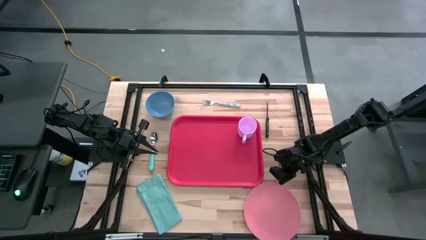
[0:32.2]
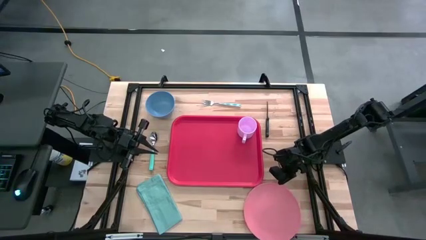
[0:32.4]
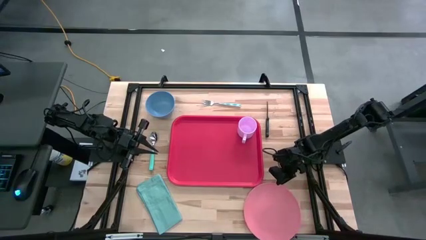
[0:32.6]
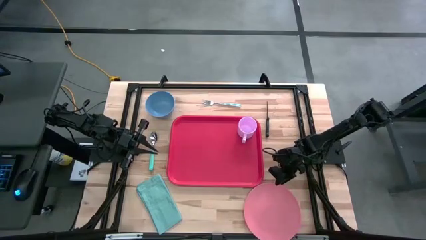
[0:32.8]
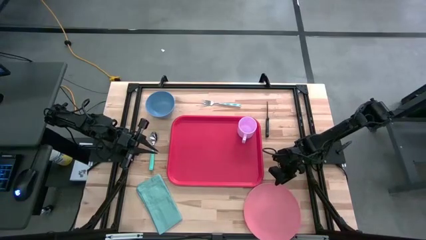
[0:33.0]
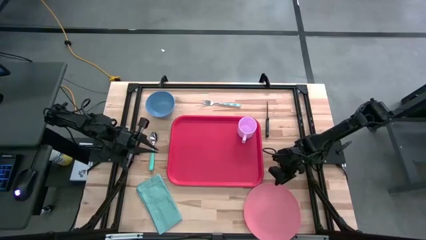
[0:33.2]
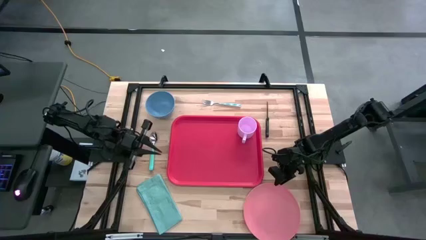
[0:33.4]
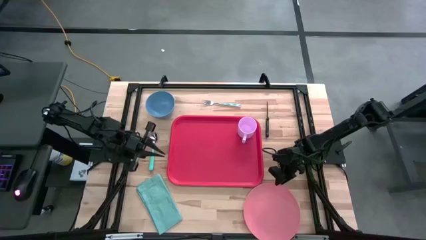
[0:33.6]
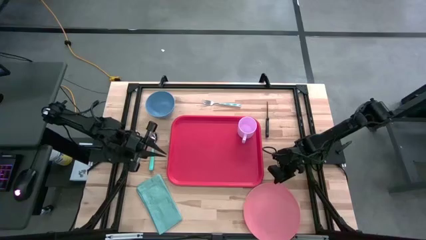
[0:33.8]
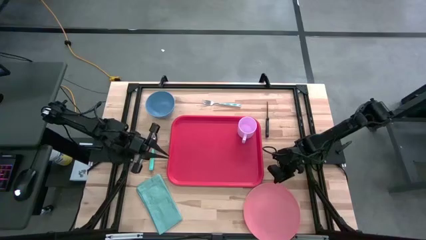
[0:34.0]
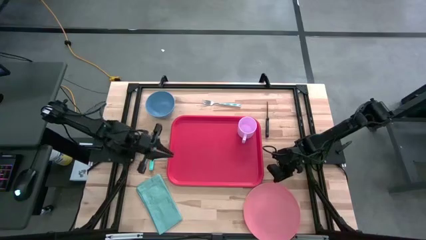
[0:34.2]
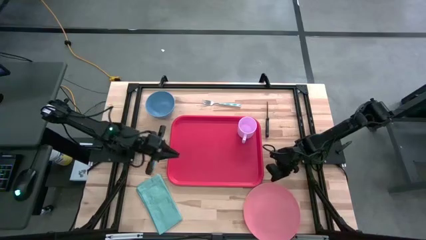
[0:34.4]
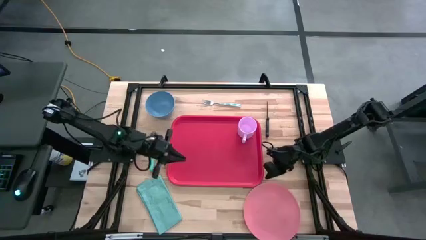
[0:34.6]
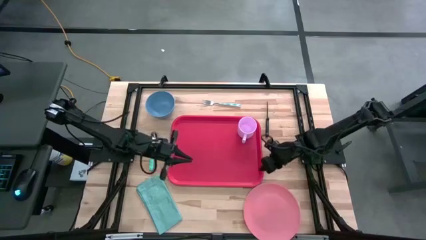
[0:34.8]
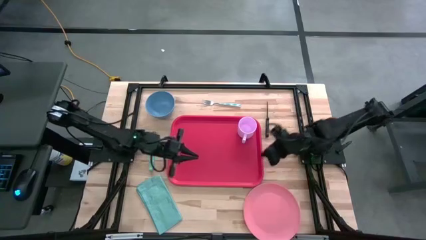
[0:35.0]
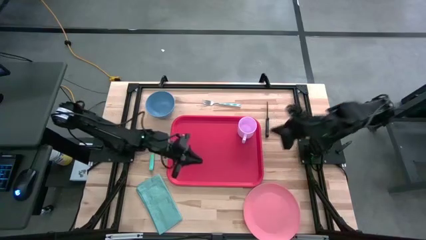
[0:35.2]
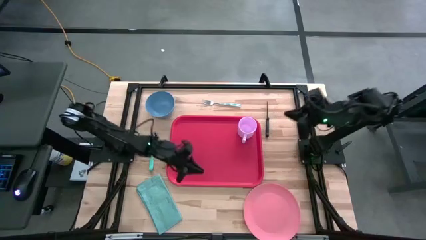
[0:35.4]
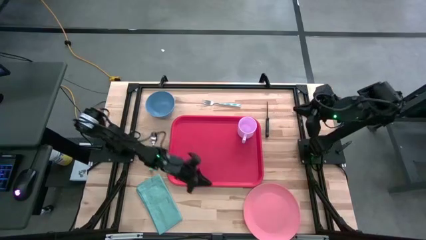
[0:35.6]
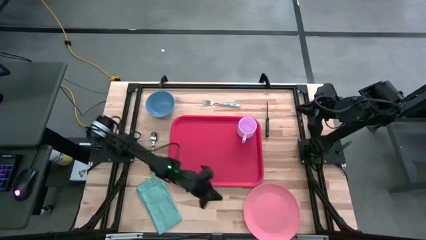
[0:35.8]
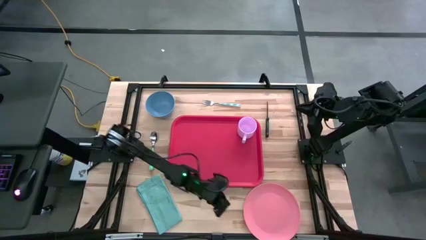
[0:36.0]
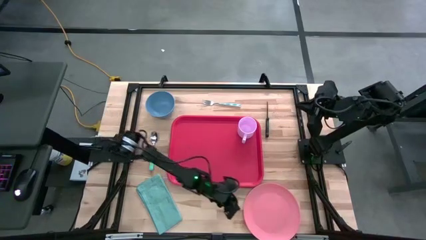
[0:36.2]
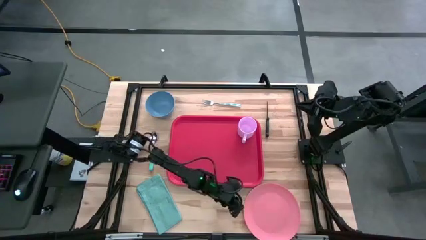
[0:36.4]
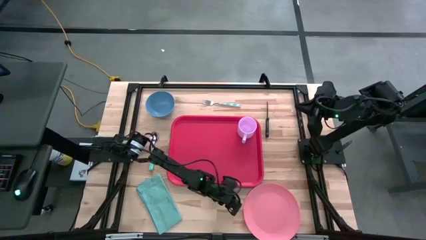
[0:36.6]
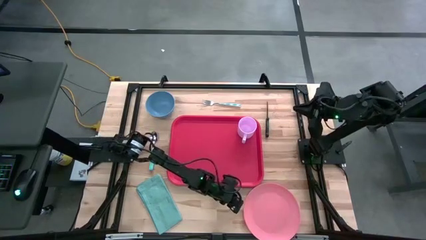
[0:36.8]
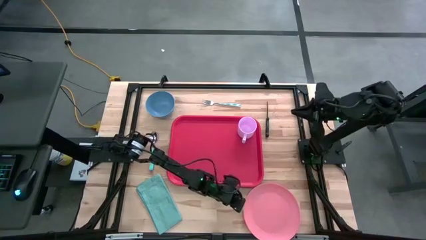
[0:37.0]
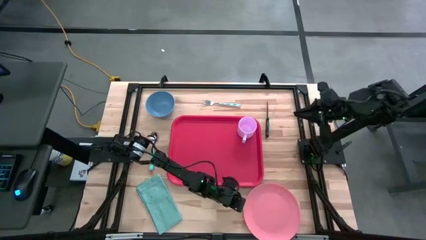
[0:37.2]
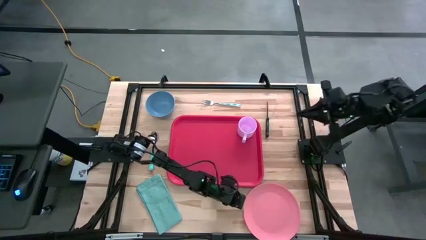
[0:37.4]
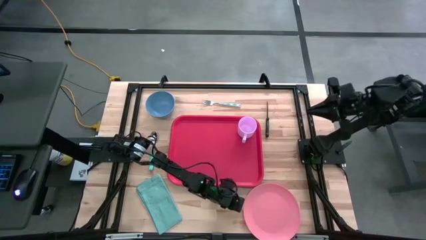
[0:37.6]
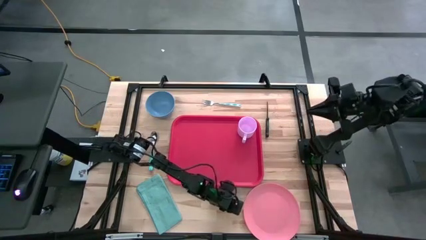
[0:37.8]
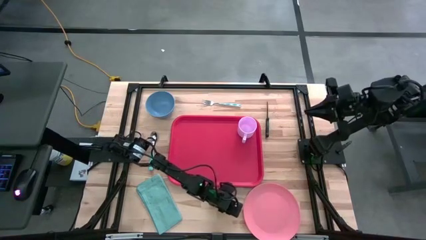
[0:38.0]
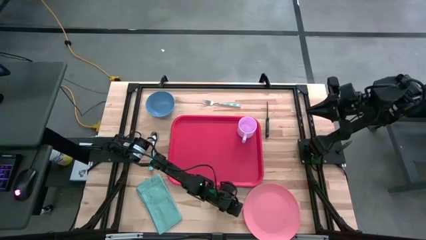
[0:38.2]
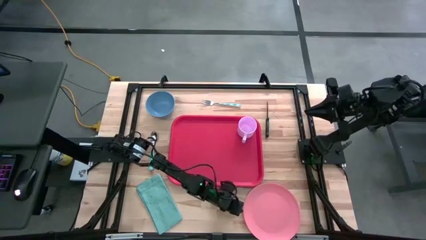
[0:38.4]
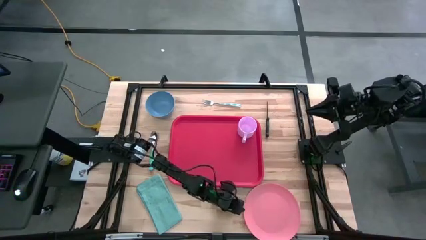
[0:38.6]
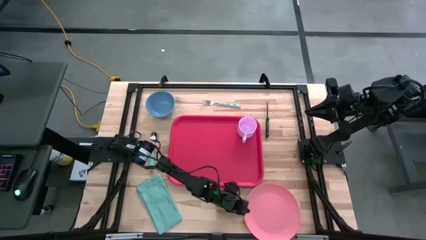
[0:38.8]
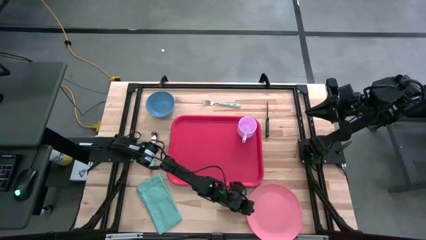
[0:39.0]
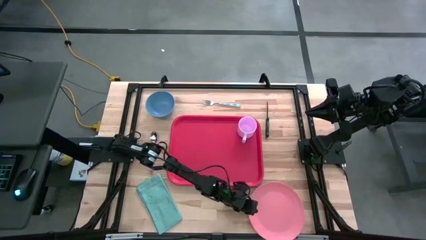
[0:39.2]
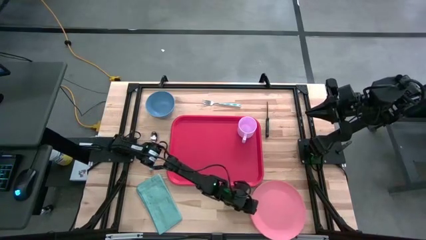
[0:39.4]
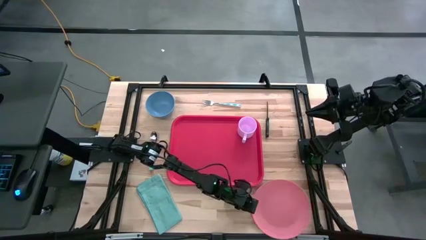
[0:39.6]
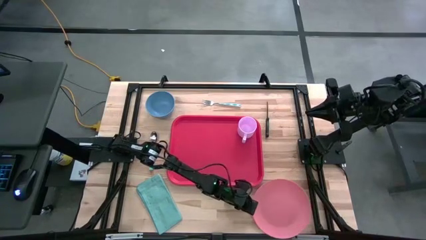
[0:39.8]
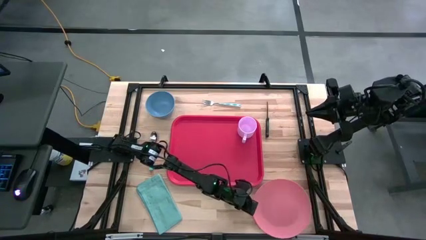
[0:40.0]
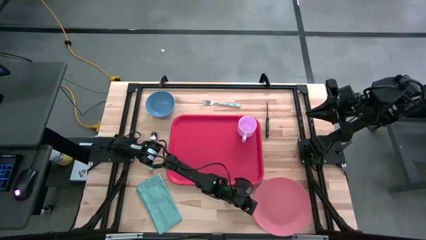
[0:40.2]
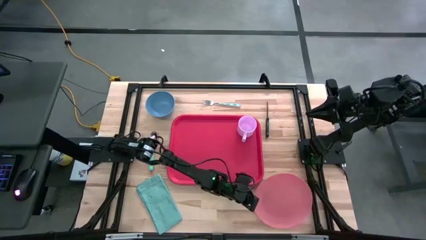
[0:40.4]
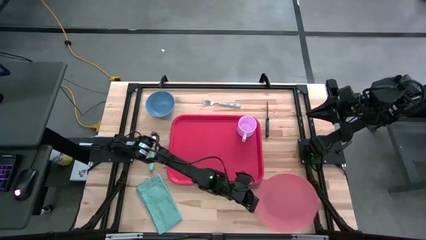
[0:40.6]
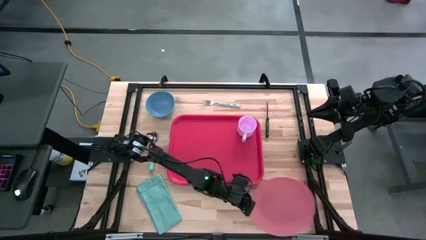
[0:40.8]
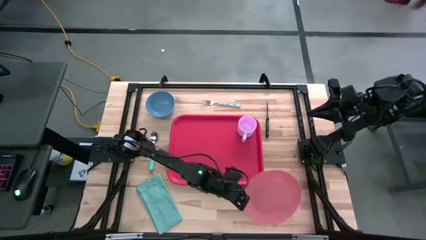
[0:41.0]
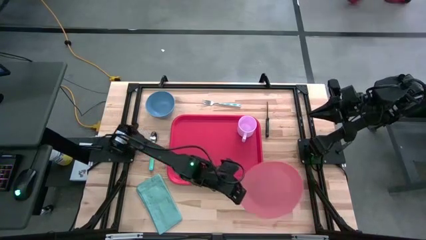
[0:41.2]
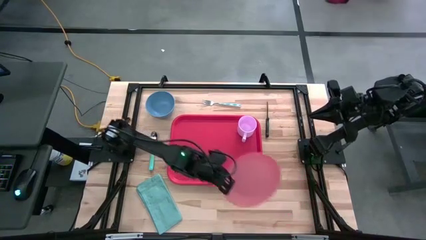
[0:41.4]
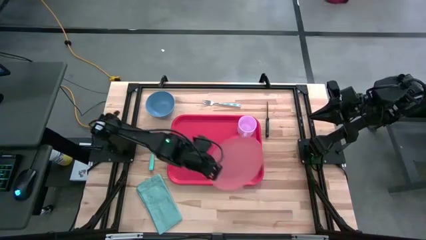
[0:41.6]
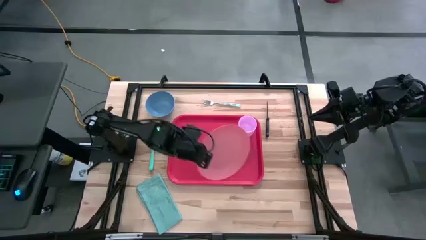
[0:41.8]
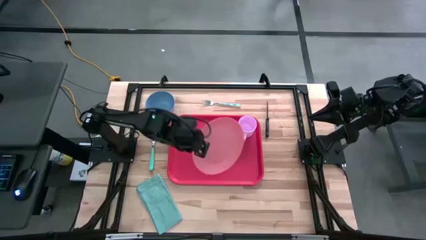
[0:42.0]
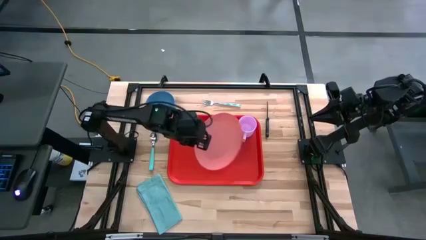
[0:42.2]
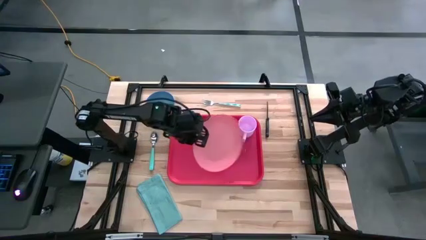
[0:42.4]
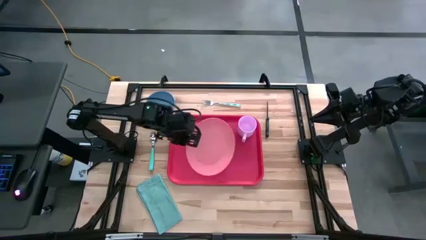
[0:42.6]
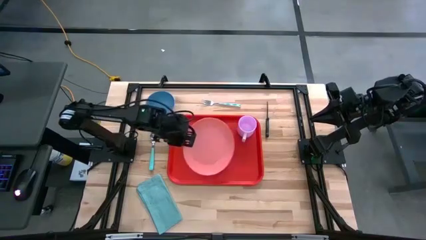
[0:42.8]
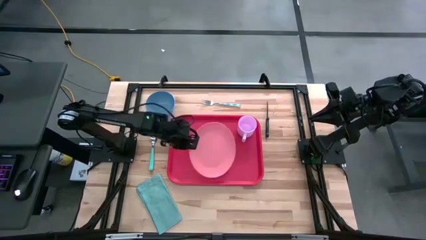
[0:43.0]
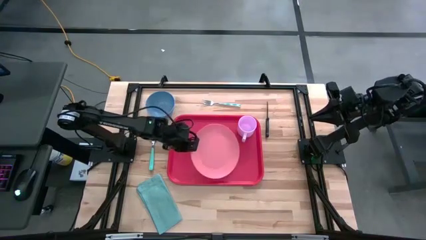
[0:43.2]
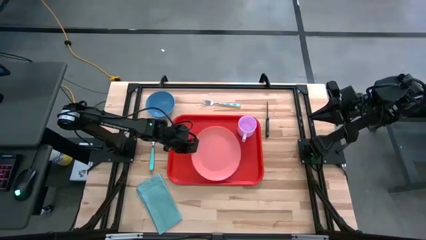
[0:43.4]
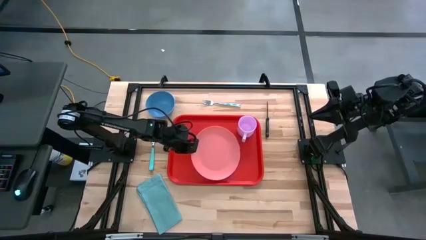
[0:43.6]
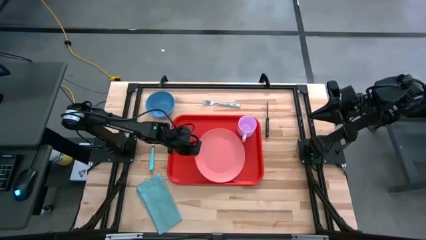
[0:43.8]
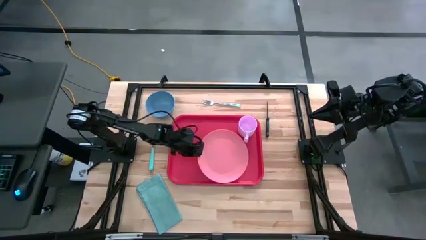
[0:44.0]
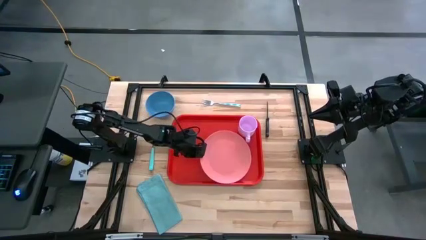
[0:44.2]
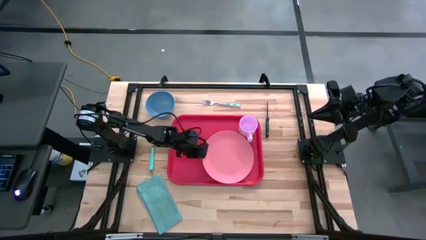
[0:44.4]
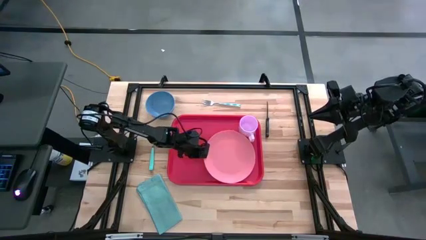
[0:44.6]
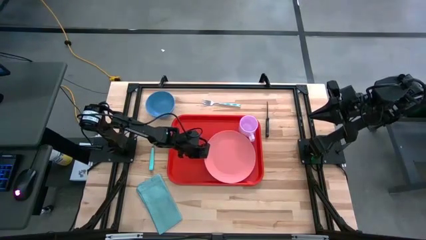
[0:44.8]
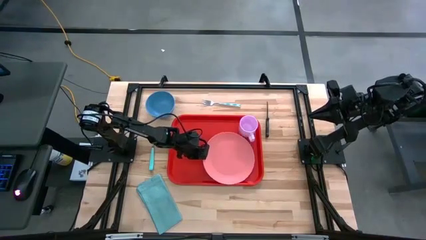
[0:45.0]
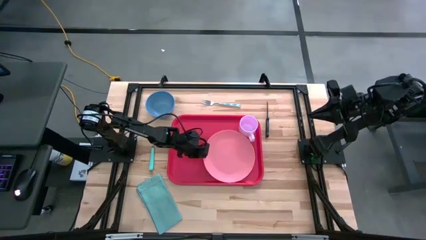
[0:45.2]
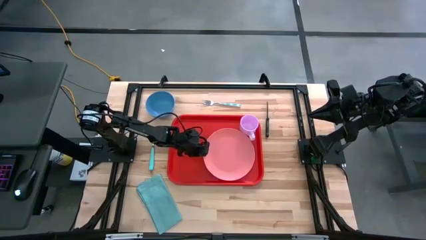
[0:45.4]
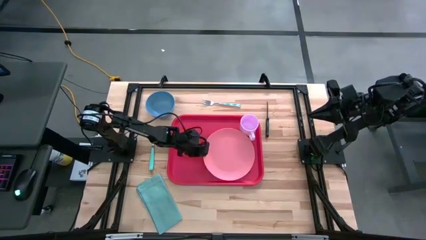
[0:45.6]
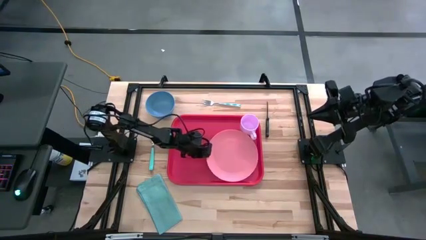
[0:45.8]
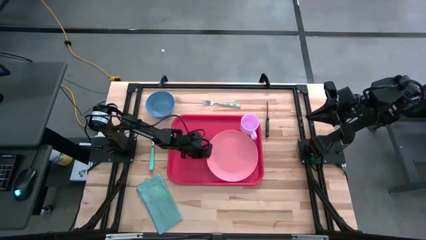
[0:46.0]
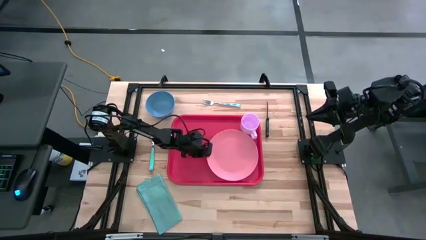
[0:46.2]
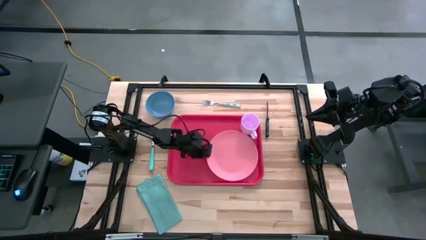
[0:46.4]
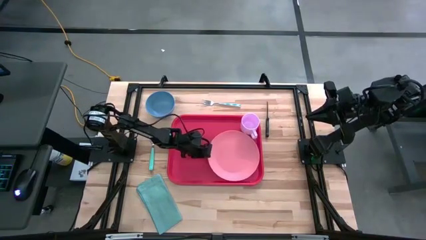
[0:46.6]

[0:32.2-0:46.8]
Task: Set up tray
Put the pink plate on the red tray to the bottom left of the purple cup

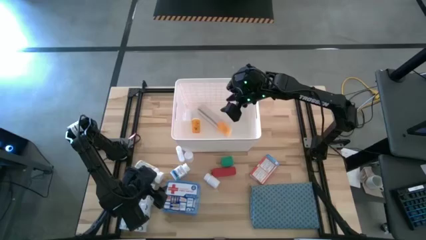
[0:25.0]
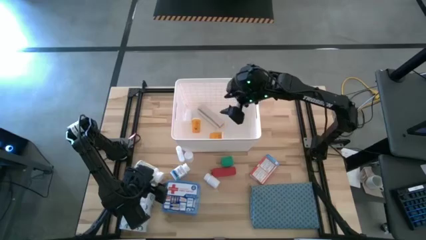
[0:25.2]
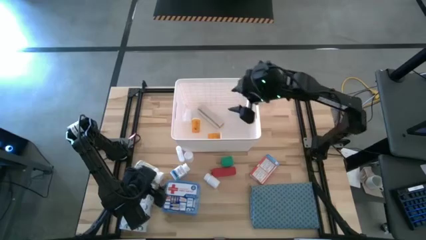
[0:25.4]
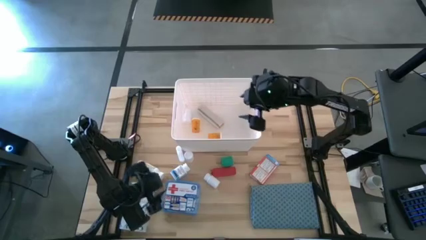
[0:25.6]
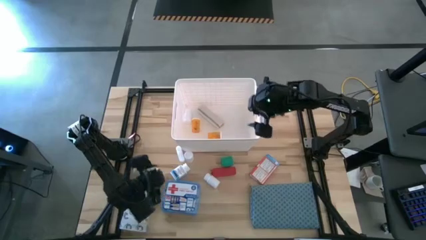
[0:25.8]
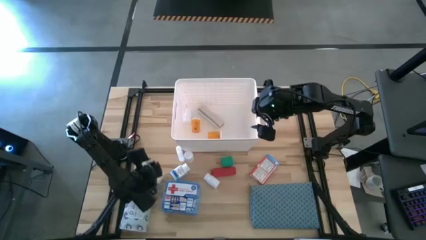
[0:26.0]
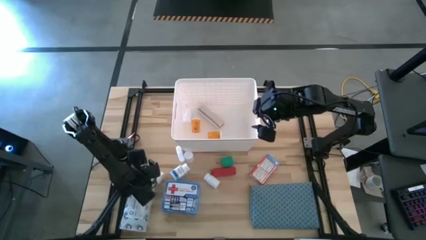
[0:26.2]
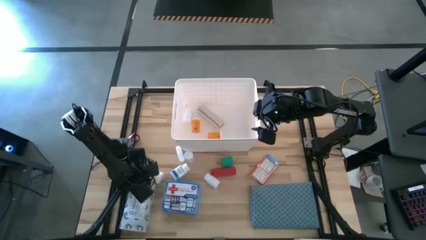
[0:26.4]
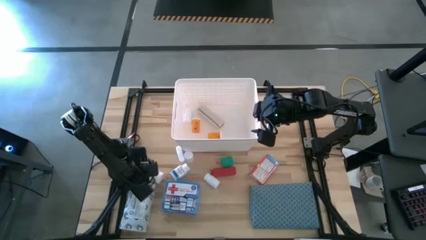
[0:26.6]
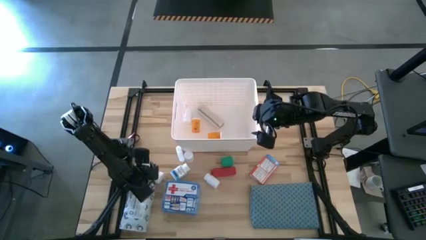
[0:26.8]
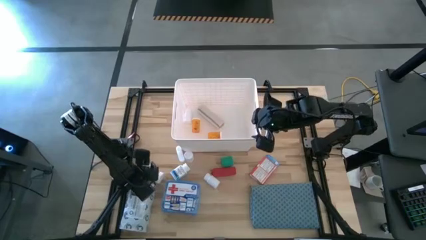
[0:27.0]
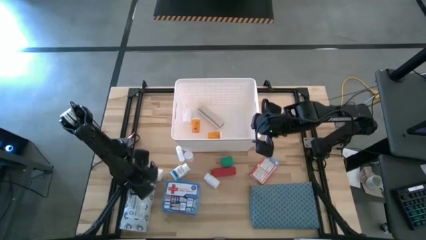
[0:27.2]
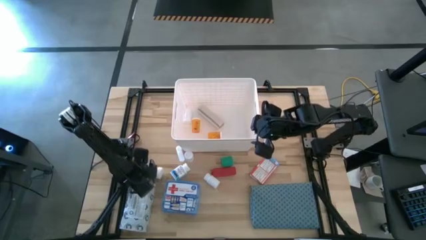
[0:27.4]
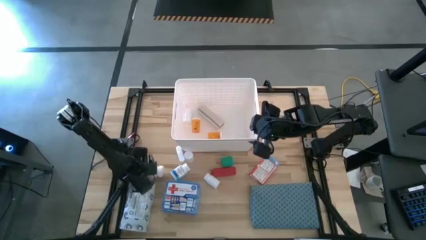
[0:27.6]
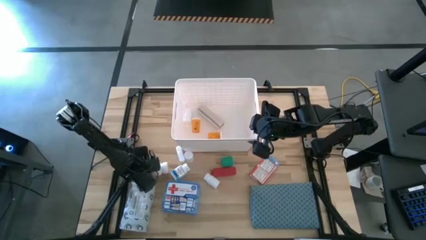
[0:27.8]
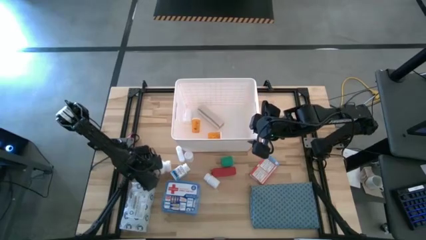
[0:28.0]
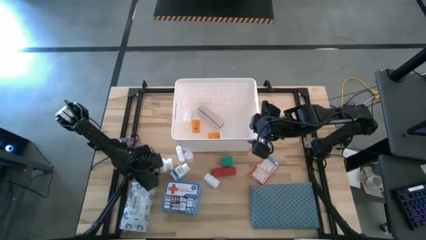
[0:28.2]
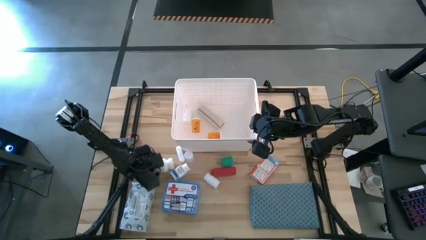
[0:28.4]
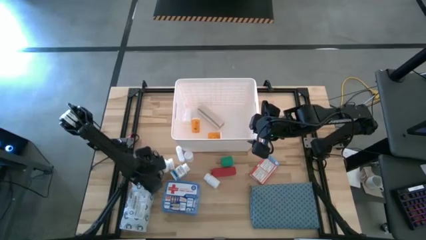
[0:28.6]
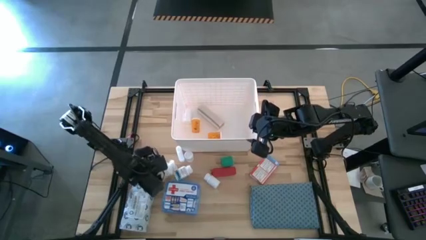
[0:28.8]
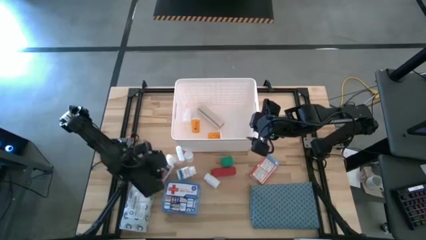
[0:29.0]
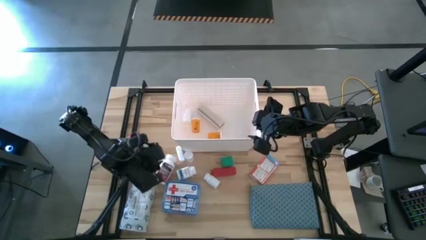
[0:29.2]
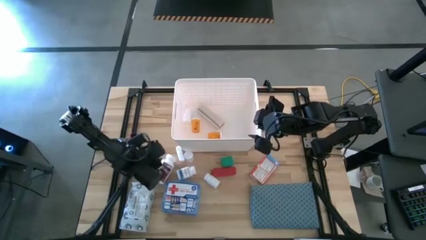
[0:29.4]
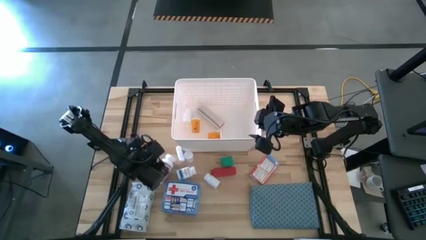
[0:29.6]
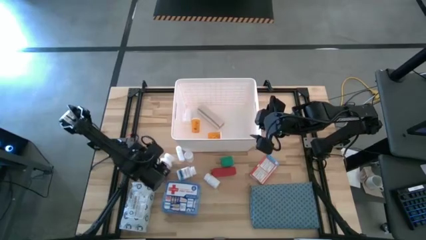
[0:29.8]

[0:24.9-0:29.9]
Task: Pick & place medical supplies in basket/bin
Put the big medicine bottle into the white bin
